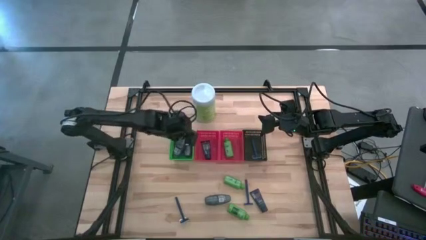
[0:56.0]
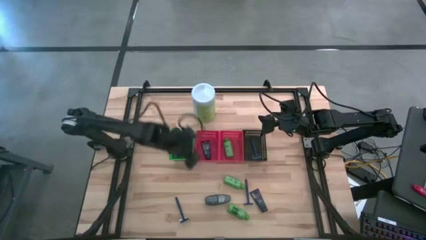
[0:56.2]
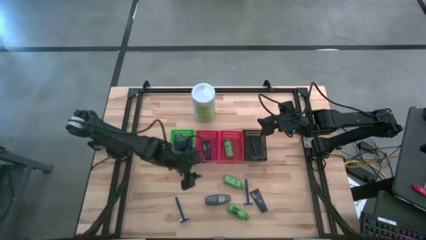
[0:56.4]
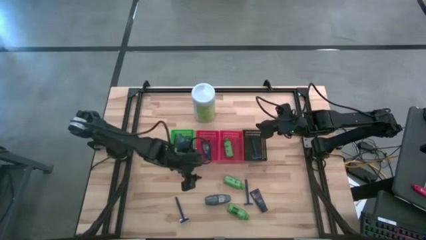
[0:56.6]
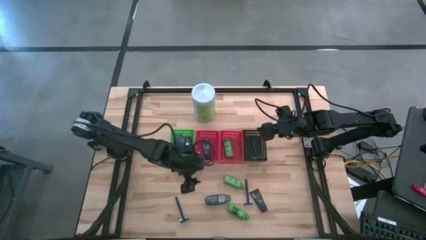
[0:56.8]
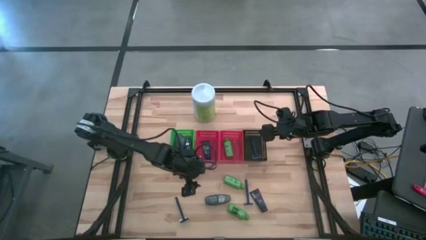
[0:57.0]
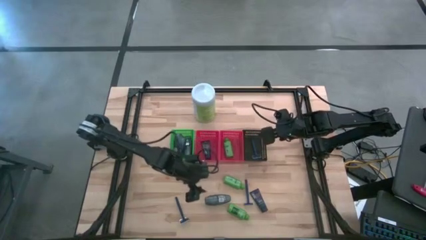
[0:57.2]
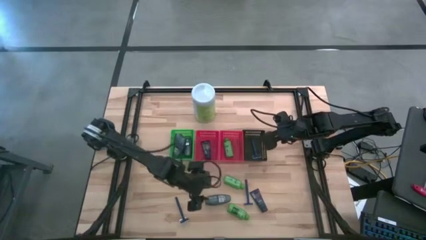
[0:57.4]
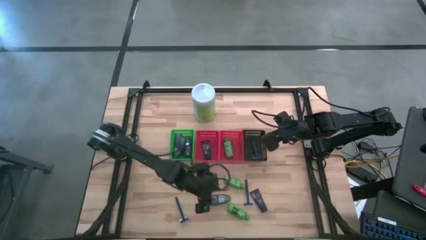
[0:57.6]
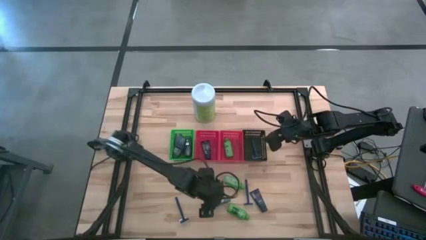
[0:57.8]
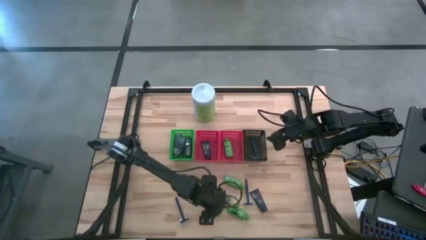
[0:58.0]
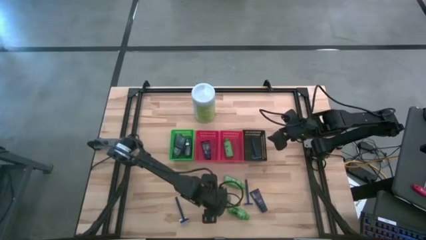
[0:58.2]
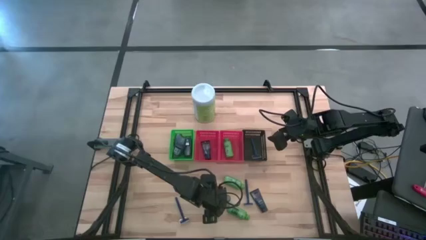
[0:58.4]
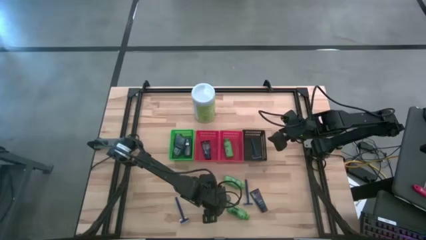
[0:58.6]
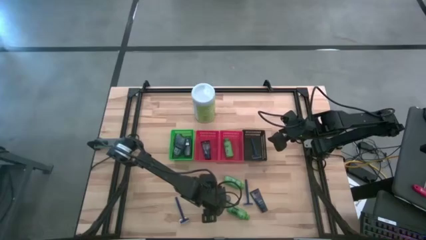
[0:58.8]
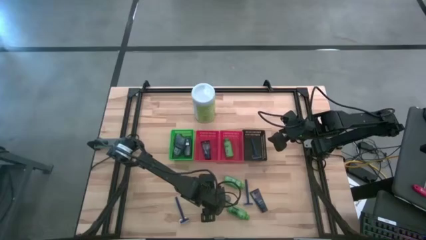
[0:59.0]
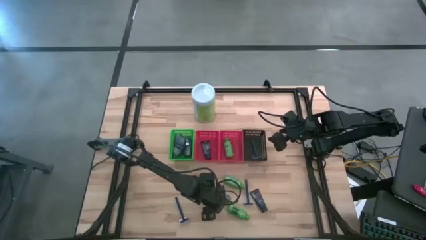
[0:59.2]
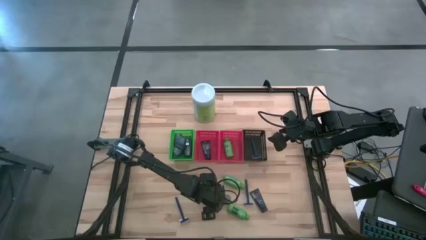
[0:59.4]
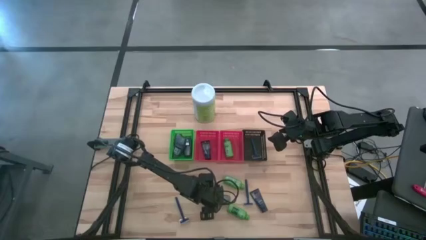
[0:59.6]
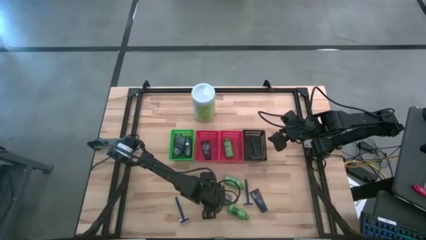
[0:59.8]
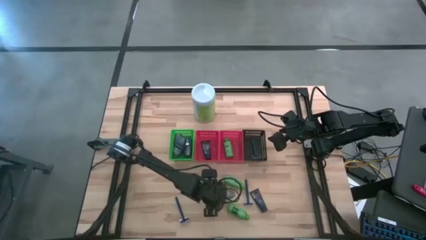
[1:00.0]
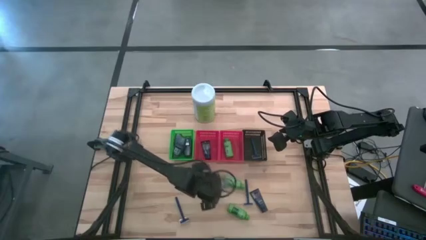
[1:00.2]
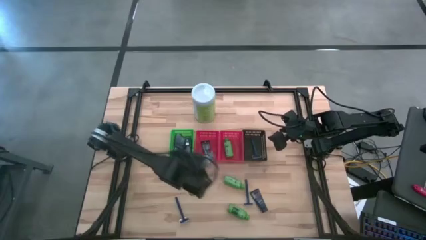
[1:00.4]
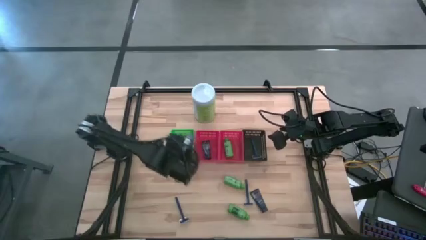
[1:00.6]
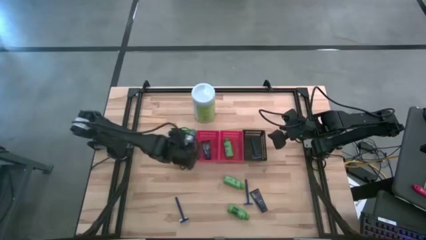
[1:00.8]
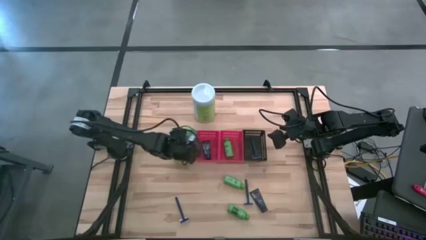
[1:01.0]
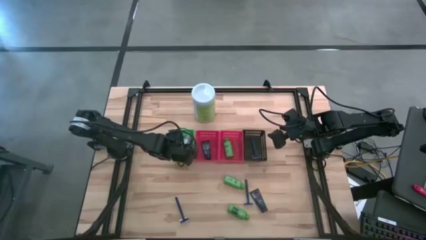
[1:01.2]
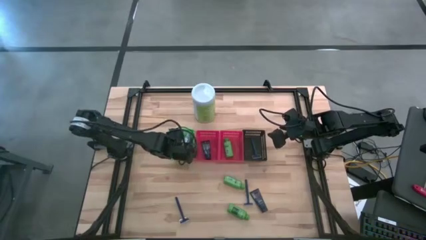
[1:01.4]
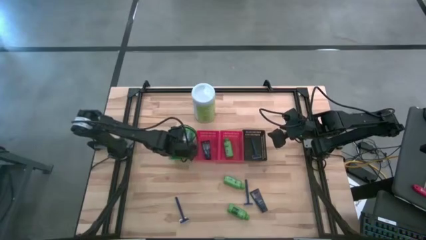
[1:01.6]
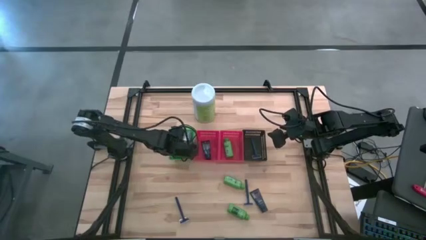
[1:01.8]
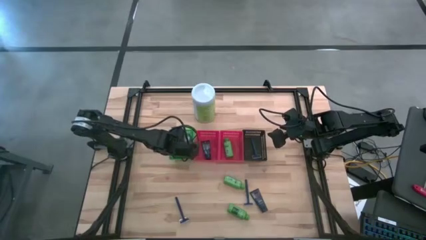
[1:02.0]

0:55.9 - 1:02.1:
Task: Pick & Place Travel size toiletries
Put the gray deodorant in the green bin

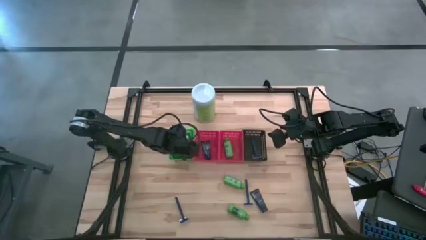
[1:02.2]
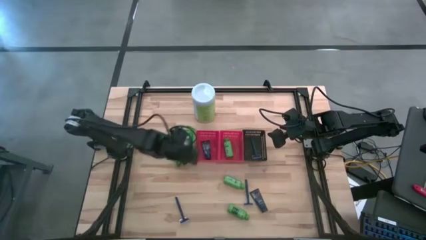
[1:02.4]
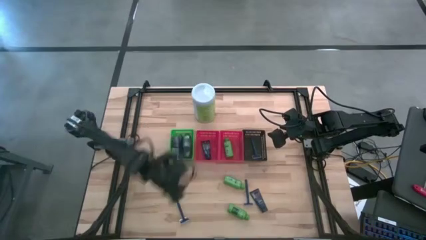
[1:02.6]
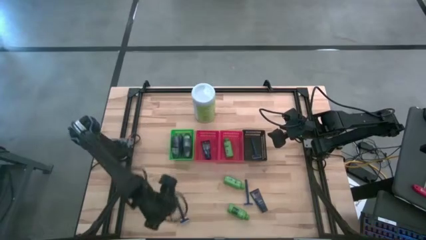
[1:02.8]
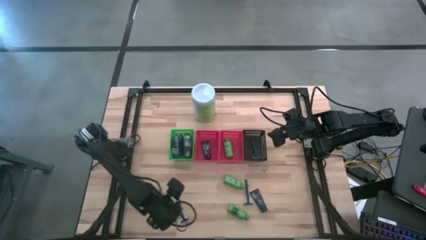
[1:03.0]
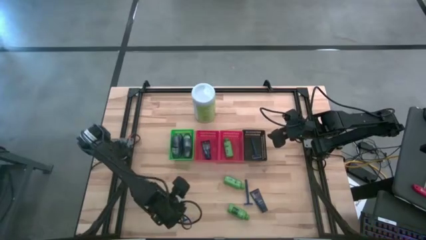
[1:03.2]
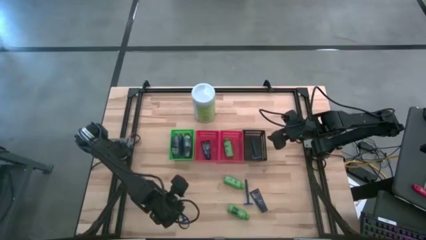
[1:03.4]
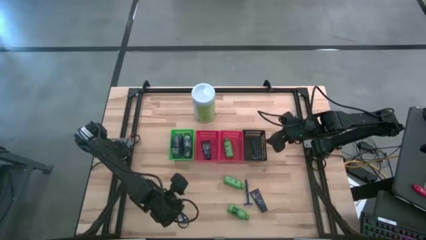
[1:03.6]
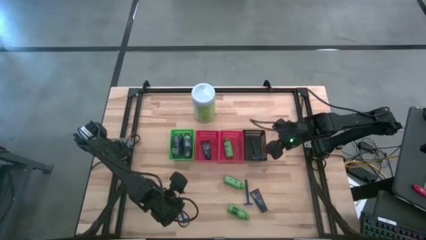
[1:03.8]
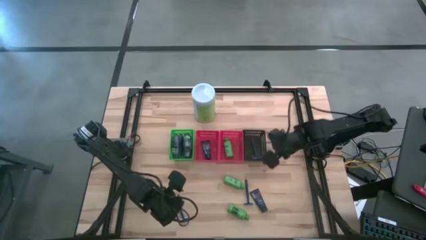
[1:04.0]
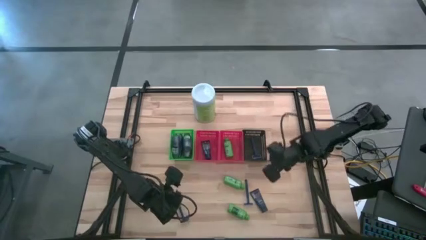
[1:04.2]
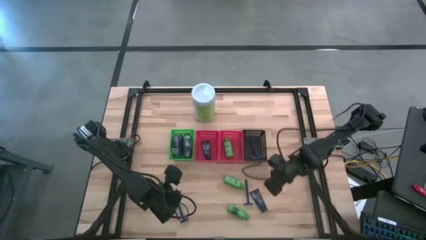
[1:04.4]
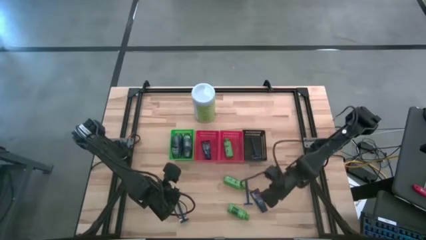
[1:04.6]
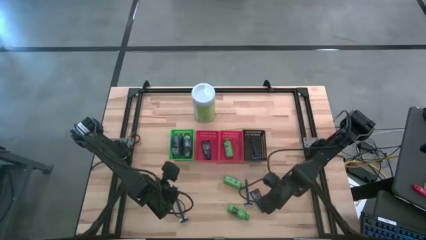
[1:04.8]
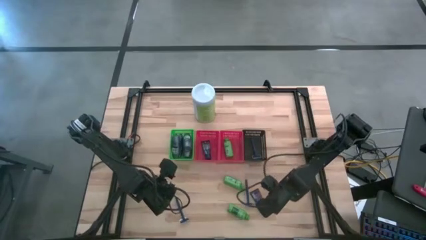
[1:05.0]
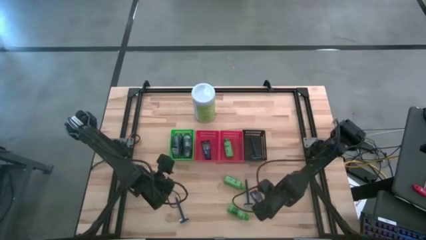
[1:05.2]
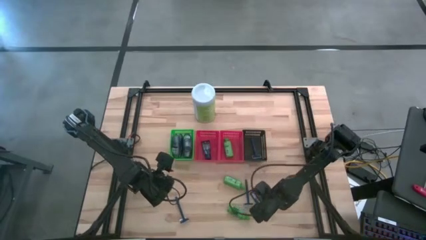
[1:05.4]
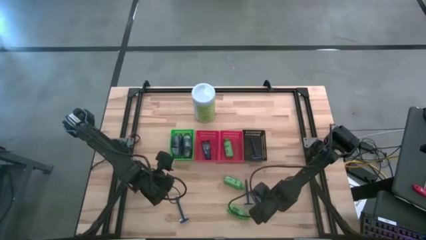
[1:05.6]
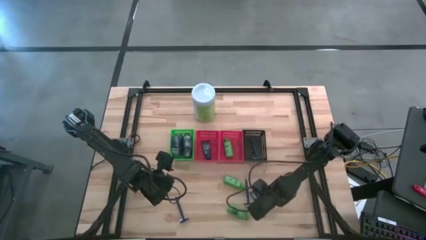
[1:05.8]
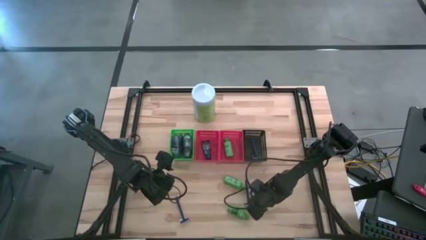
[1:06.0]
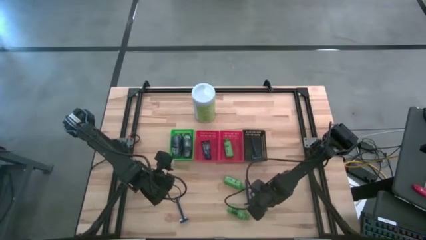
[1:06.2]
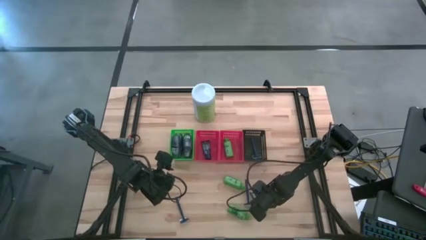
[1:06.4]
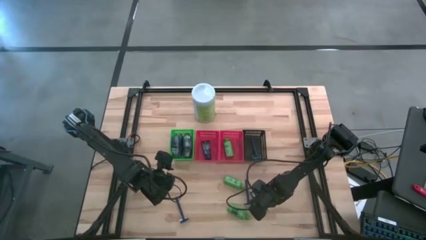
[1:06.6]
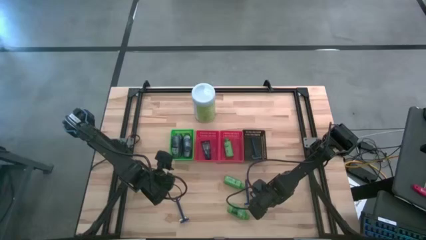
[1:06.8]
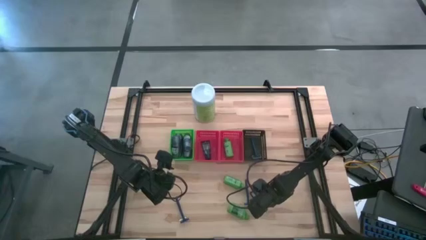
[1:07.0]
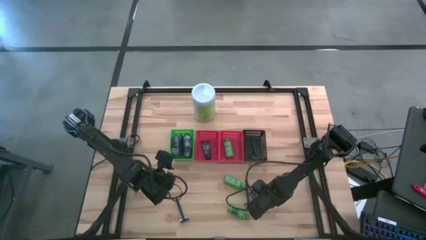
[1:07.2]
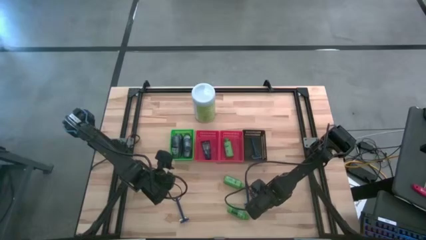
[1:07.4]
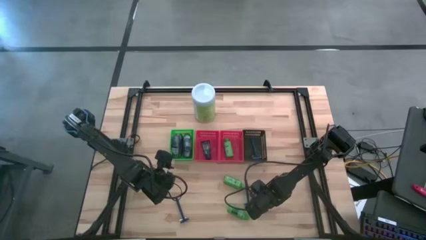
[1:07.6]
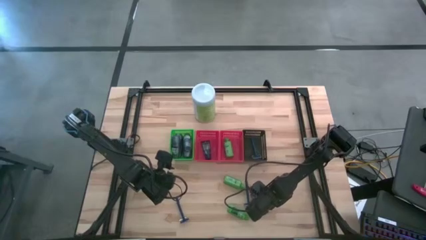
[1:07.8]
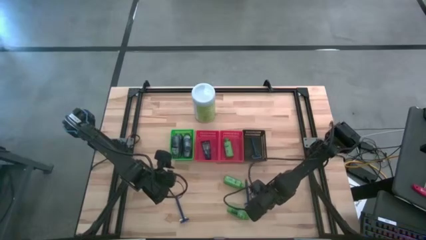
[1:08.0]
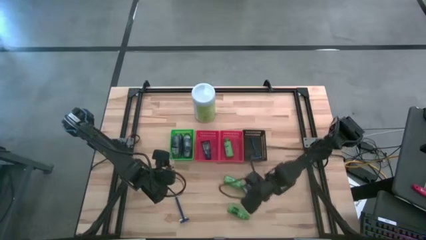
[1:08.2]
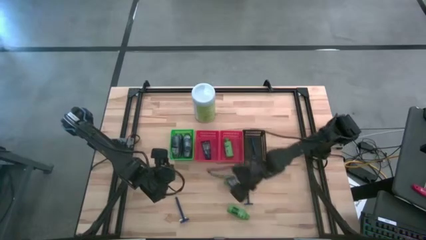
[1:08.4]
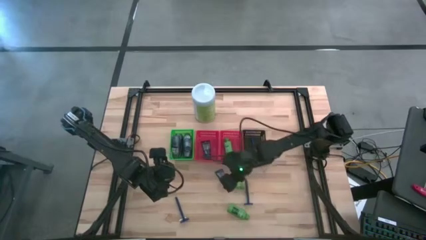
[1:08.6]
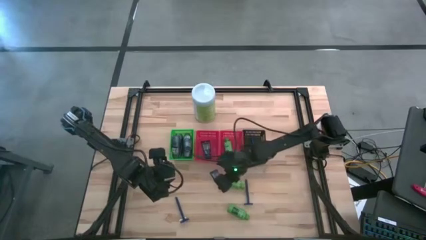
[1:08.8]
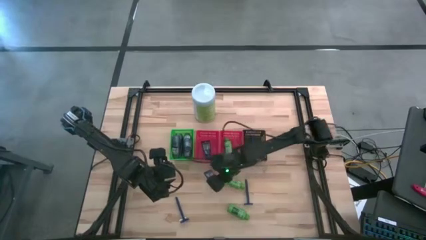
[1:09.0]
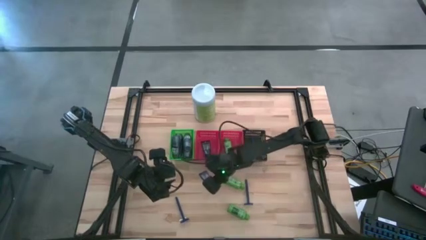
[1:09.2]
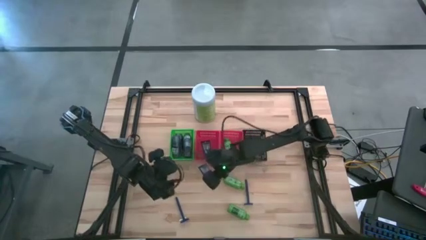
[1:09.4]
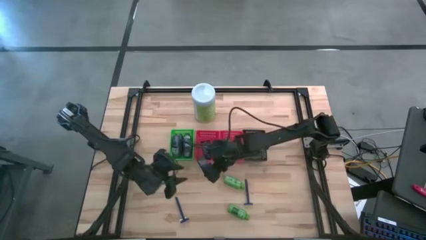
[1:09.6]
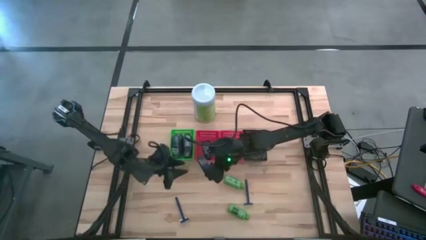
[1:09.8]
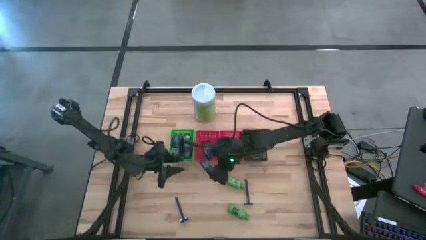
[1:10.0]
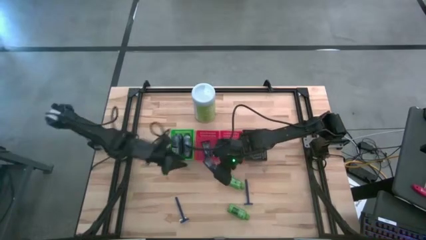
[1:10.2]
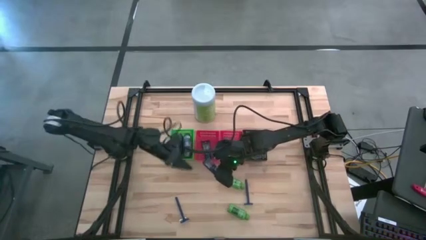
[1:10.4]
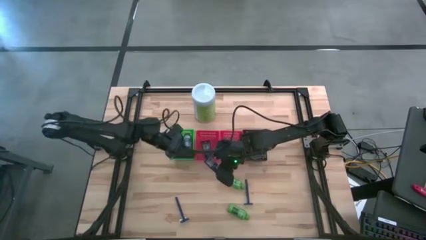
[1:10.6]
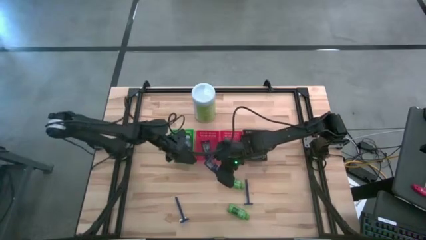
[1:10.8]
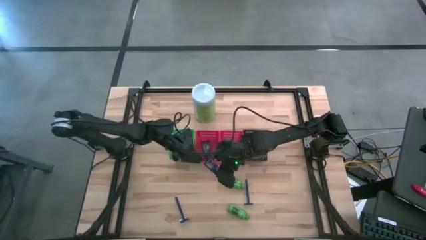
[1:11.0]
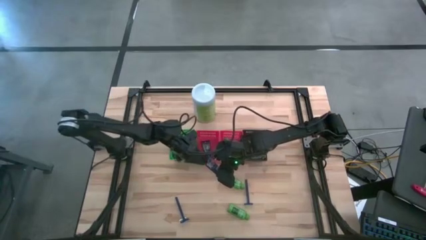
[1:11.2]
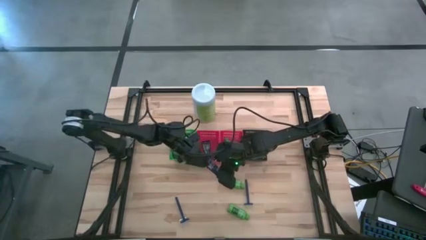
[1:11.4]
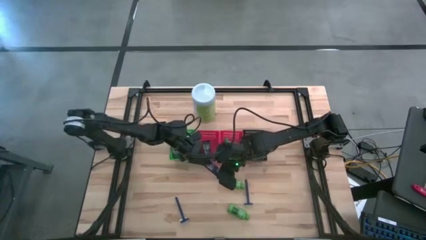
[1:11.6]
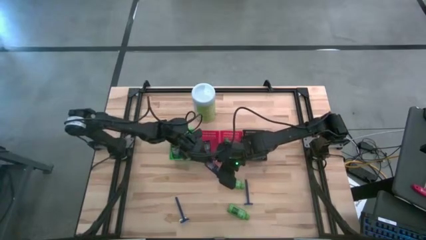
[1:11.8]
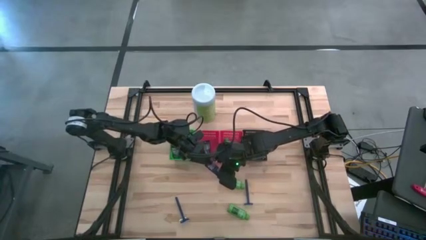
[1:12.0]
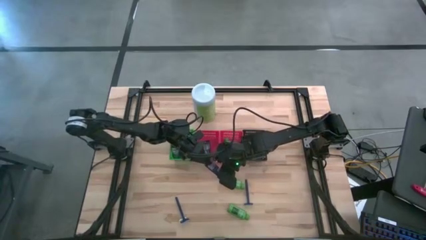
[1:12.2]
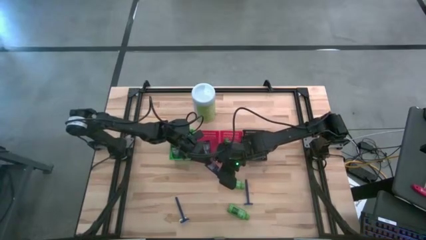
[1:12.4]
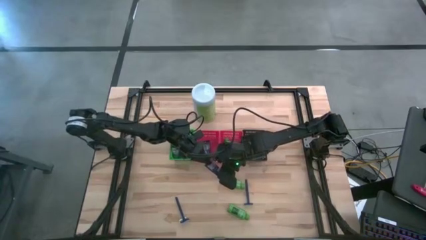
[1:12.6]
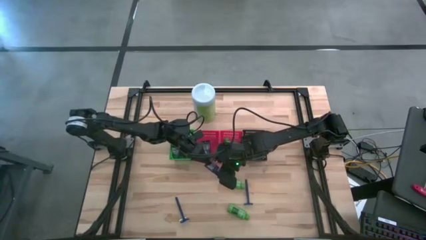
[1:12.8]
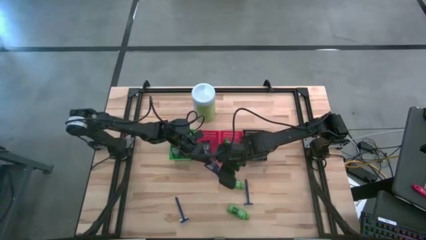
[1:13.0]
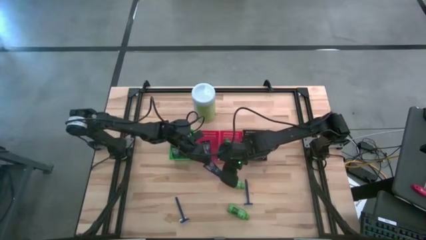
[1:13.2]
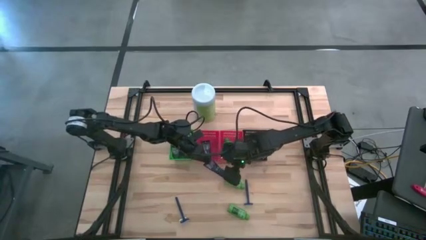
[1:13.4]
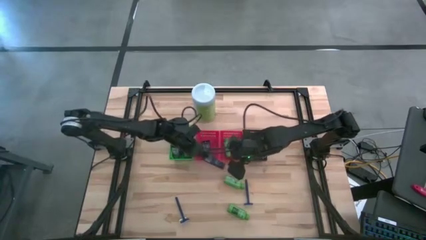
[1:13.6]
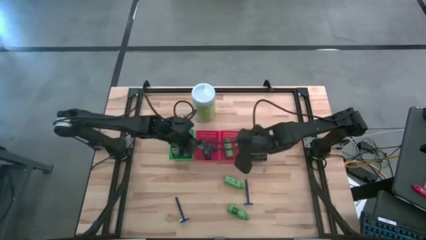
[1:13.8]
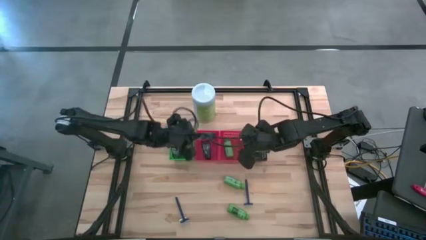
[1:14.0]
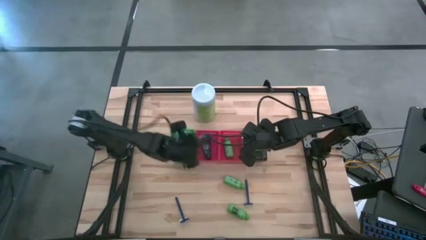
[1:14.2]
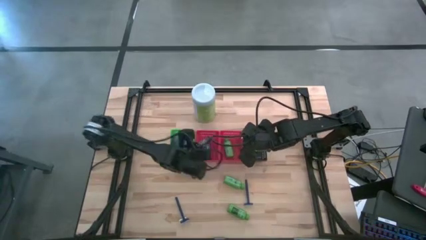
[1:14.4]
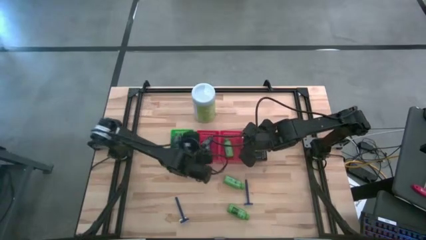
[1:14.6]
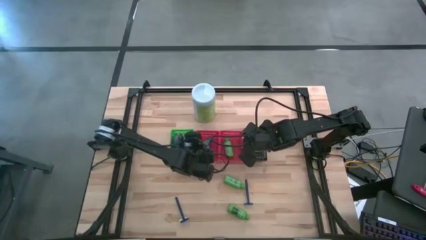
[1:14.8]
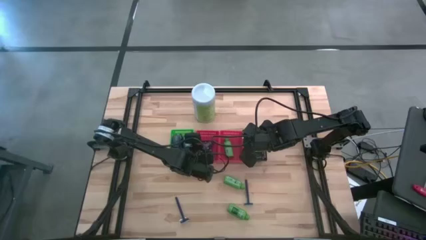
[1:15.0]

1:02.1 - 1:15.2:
Put the dark blue shaving cream in the left red bin
